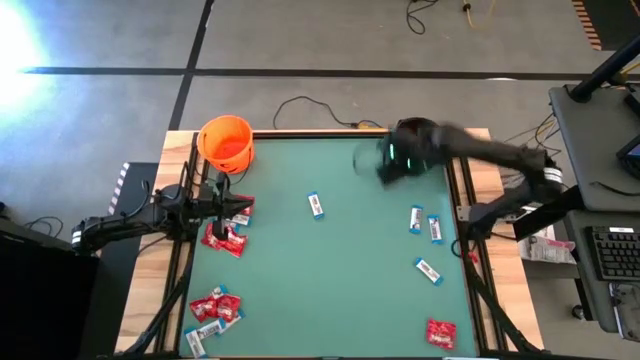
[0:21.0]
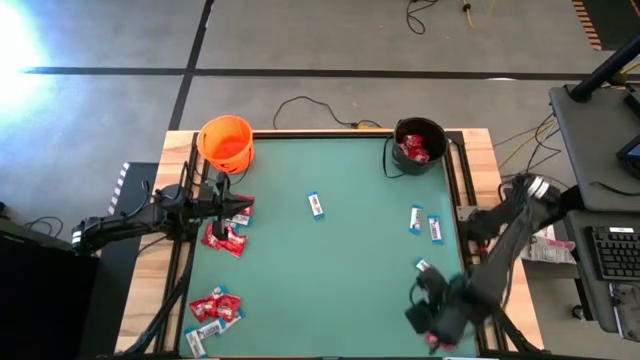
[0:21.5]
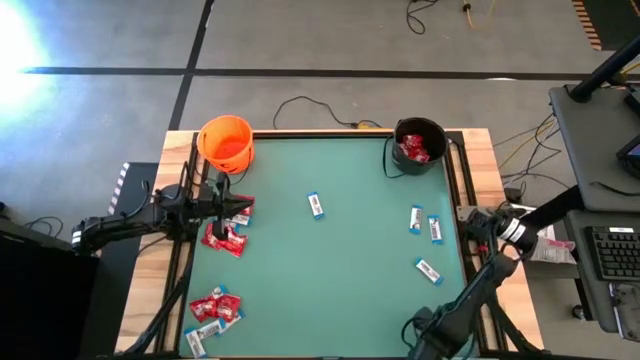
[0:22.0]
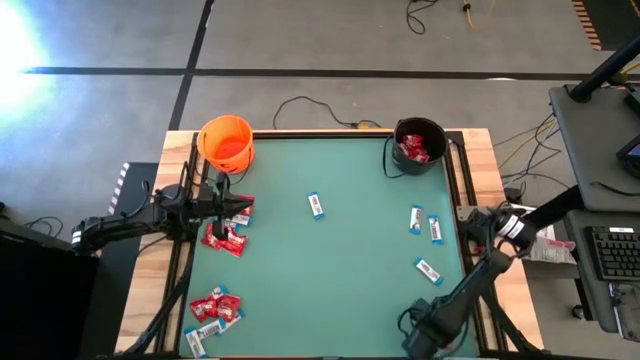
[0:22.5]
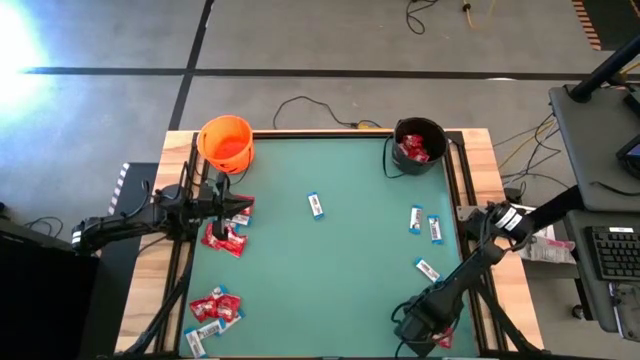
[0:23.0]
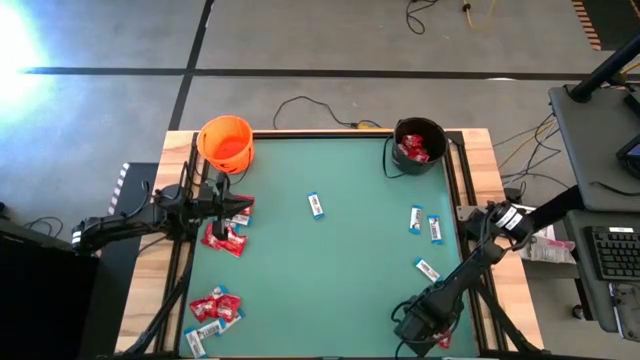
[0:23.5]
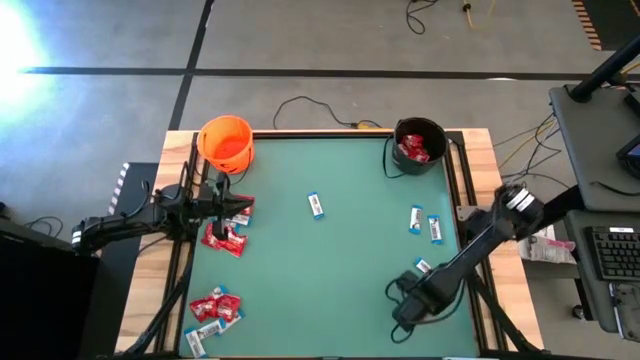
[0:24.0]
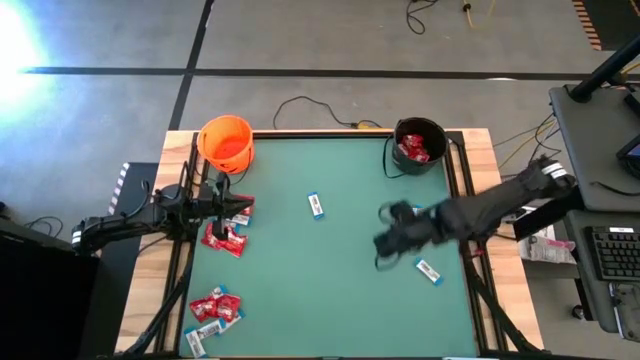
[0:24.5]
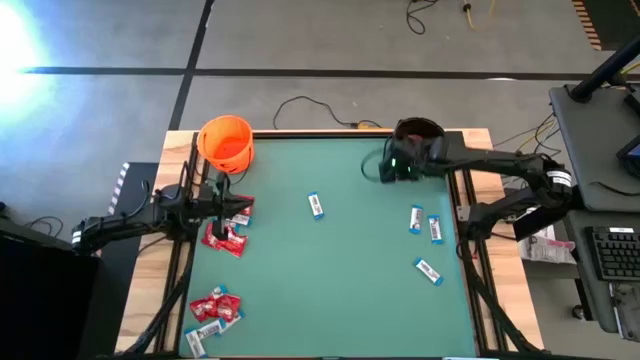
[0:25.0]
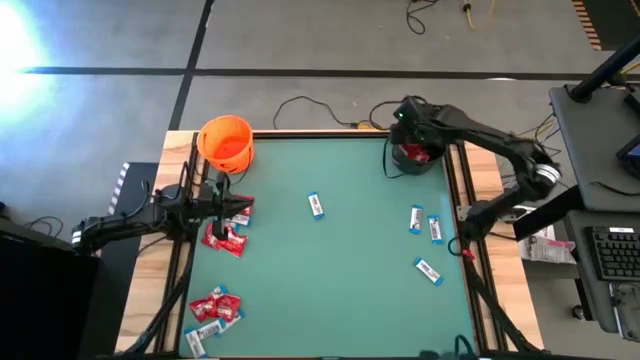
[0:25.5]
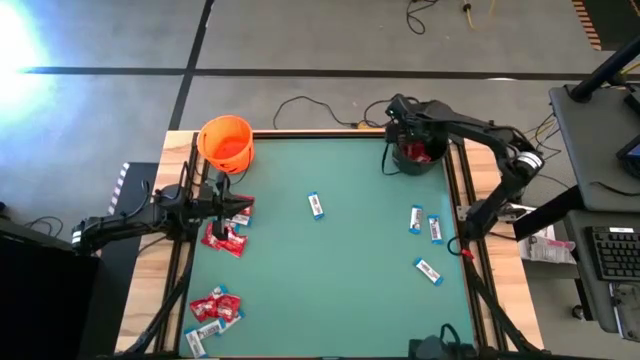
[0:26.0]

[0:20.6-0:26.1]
Task: Sort candy by brand, put in halloween buckets
Put the red candy into the black bucket

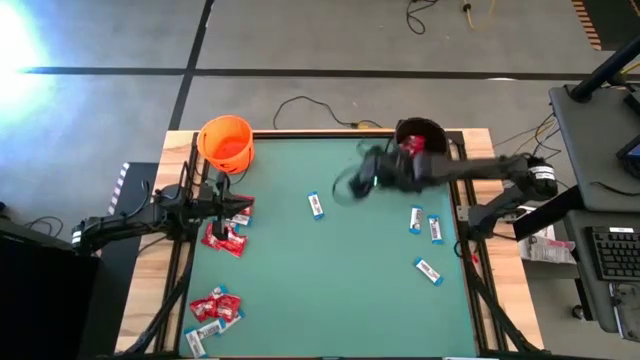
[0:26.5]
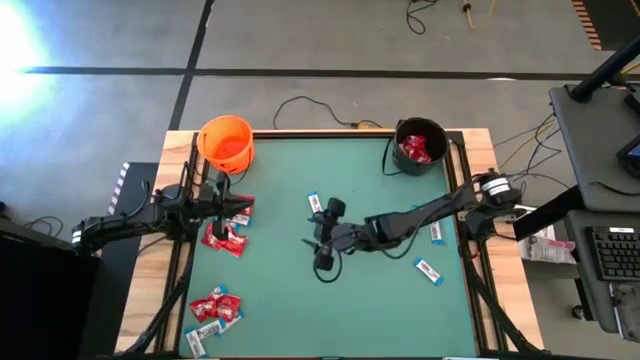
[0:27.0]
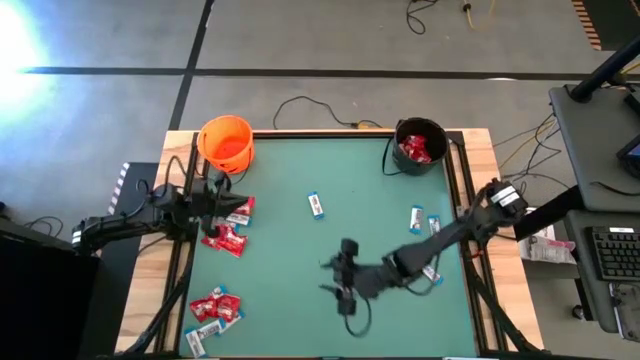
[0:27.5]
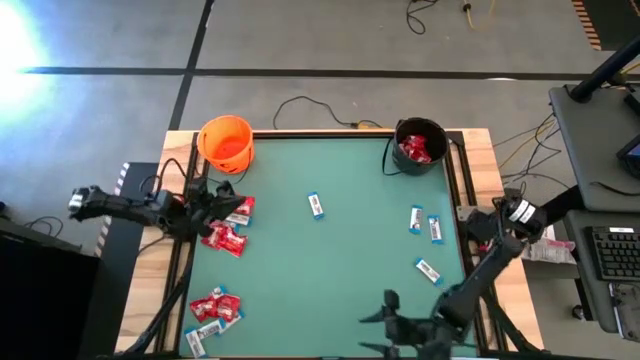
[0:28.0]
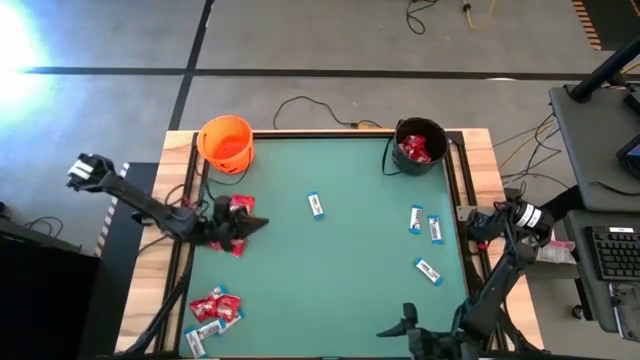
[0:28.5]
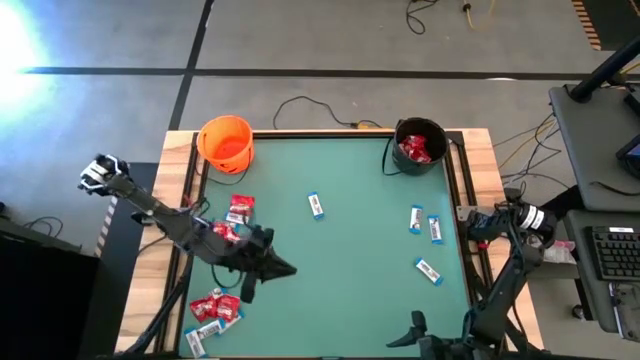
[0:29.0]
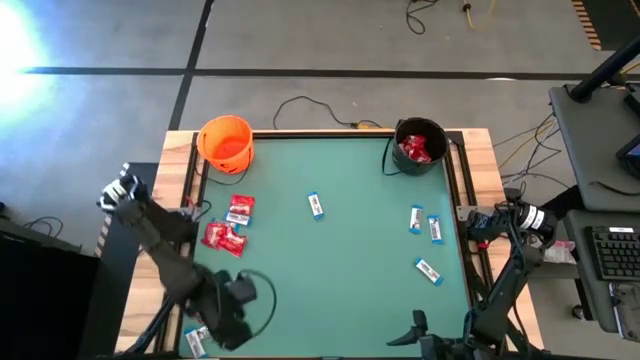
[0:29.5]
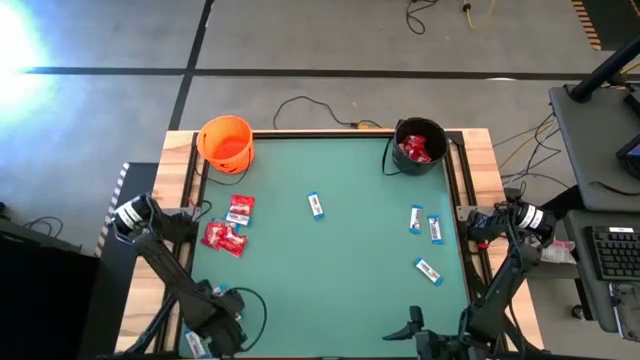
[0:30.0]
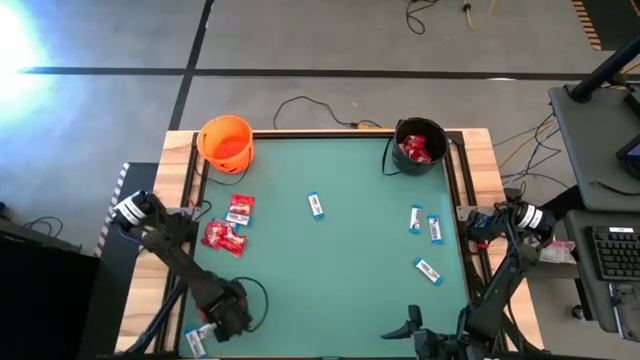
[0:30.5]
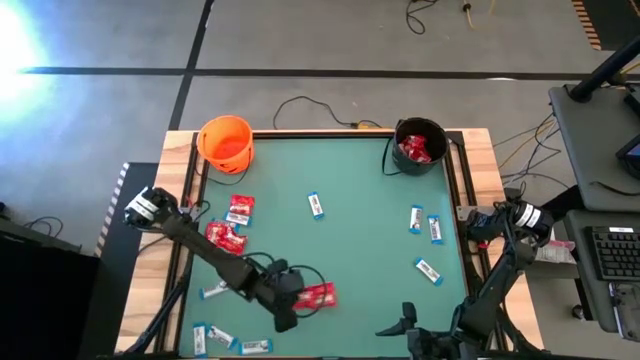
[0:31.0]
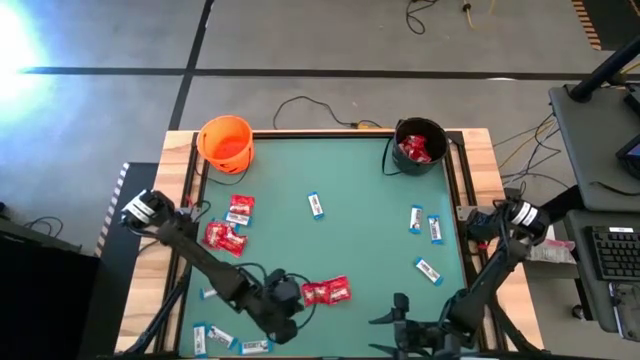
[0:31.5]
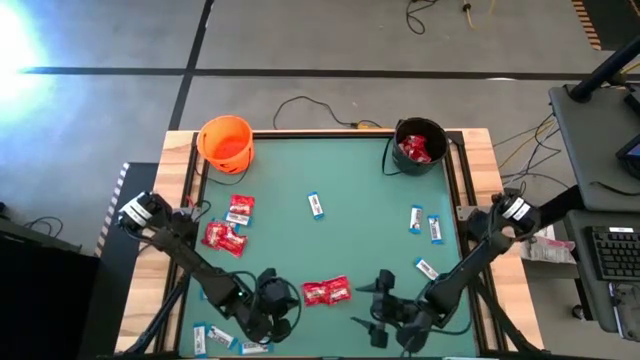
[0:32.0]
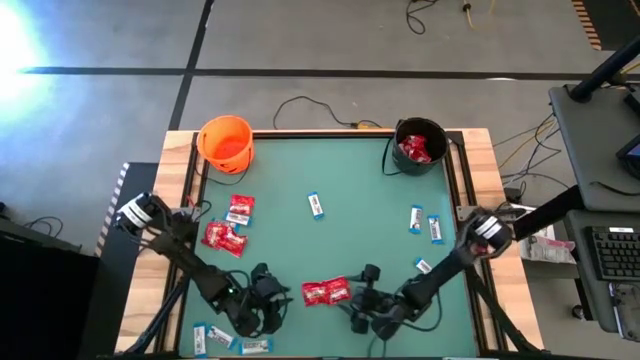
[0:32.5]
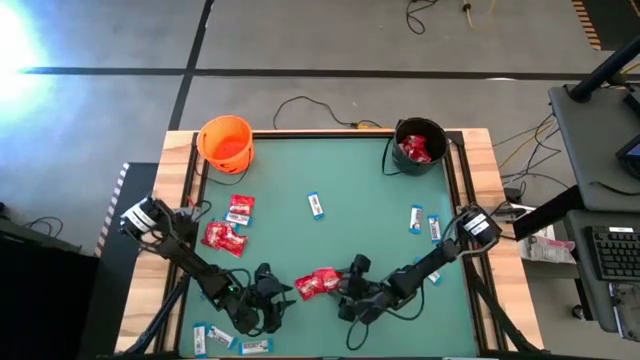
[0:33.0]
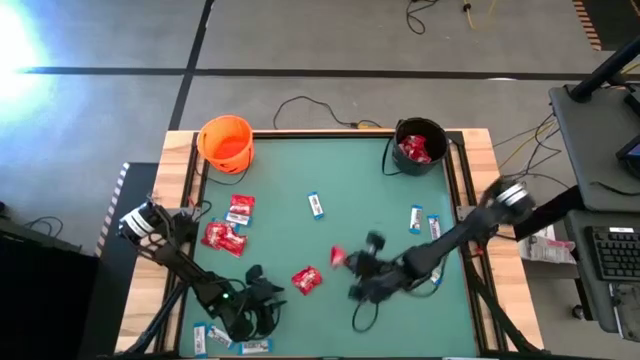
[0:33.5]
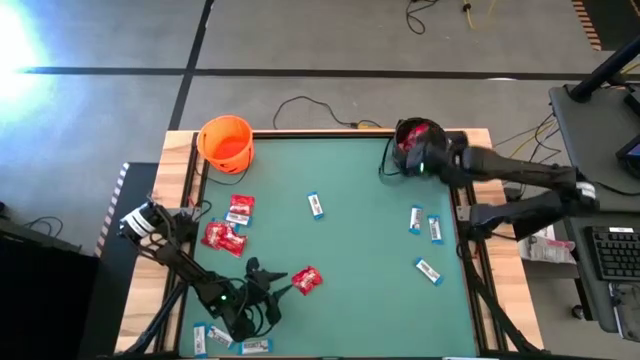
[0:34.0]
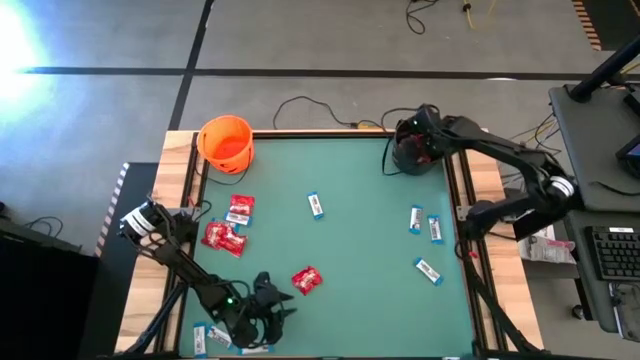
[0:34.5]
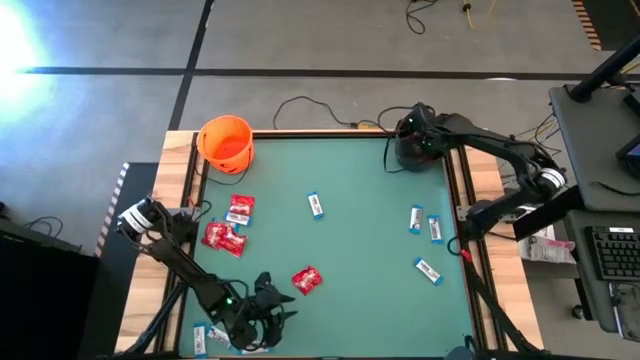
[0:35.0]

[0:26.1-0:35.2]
Put the red candy into the black bucket

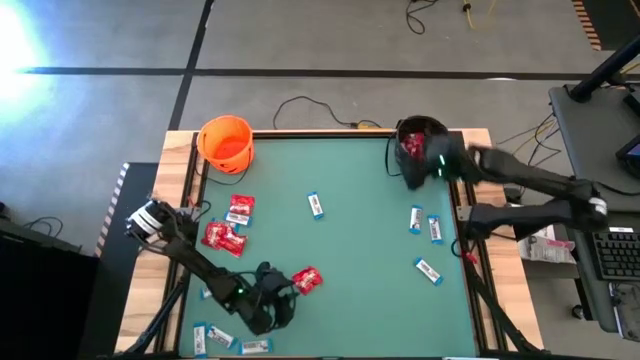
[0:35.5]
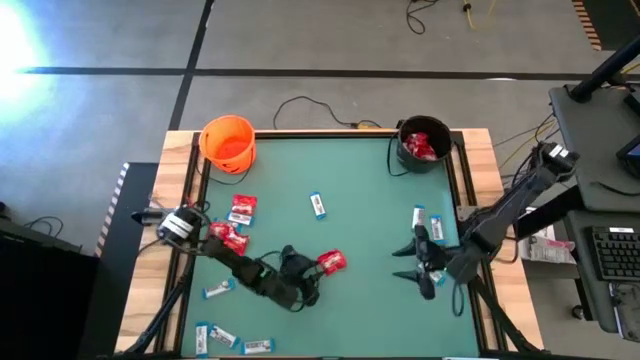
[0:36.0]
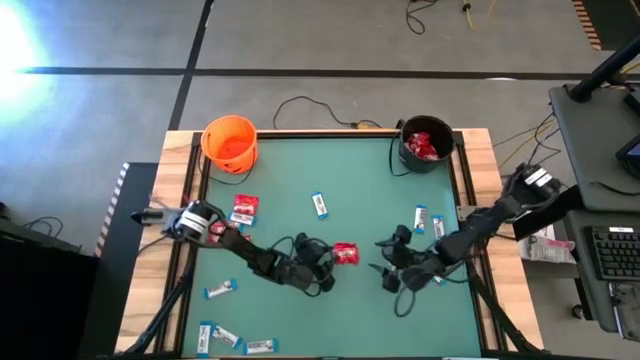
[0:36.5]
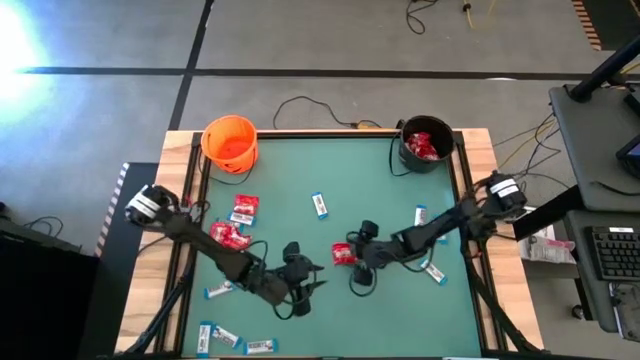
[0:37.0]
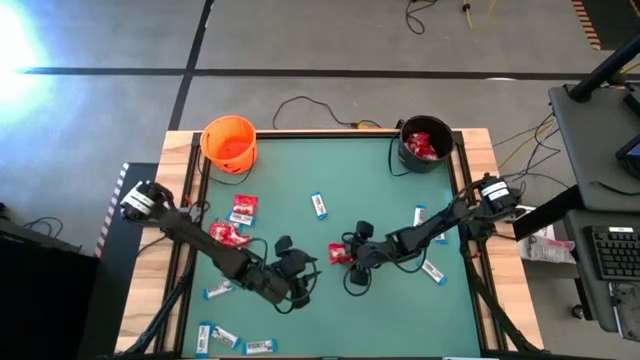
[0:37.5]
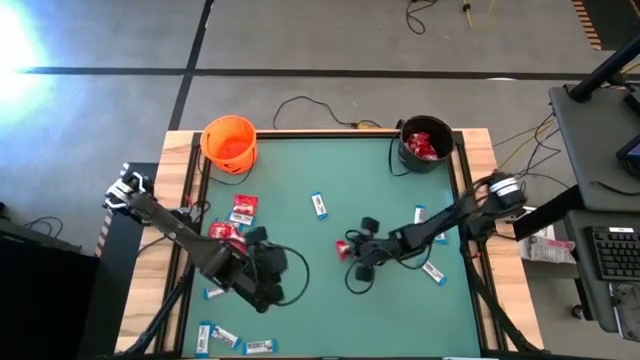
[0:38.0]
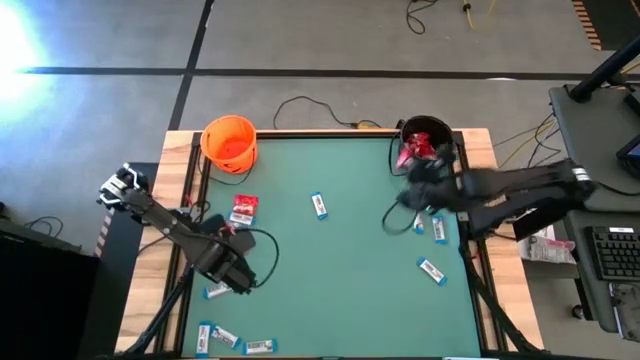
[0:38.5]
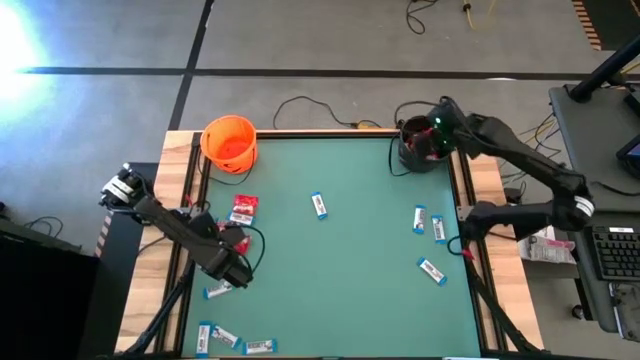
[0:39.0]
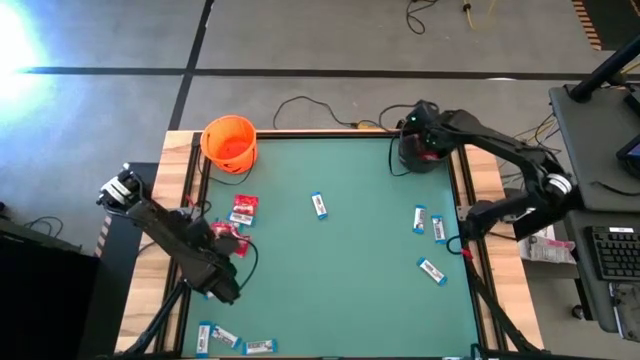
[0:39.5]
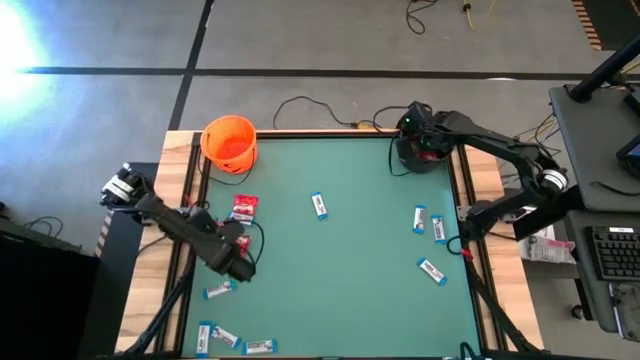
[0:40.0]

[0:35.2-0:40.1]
Put the red candy into the black bucket

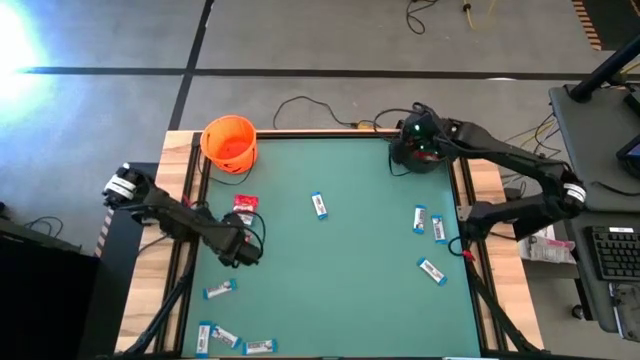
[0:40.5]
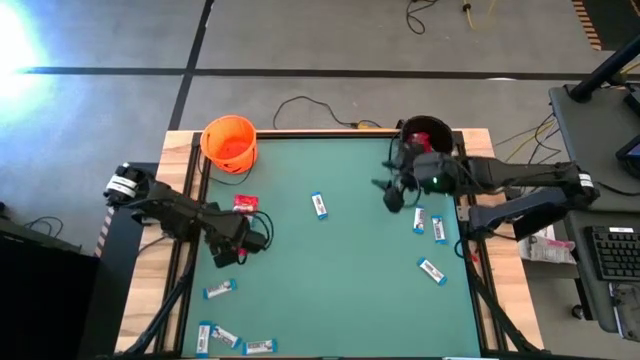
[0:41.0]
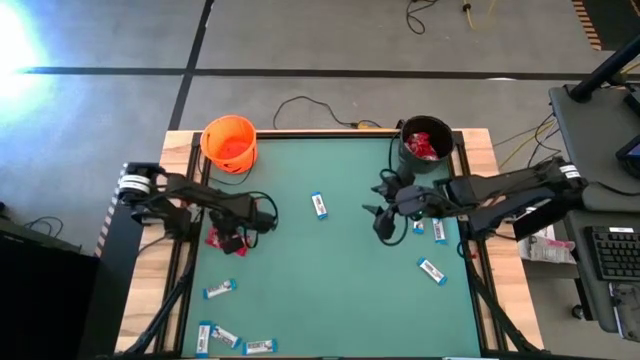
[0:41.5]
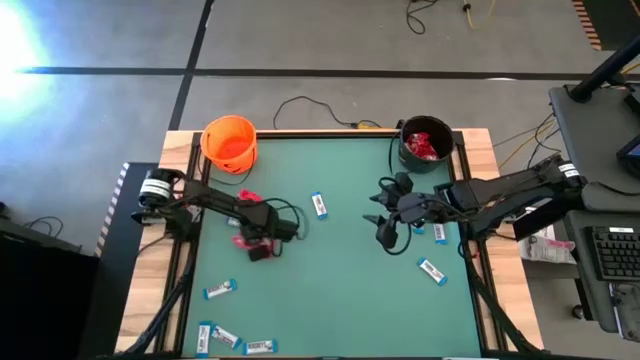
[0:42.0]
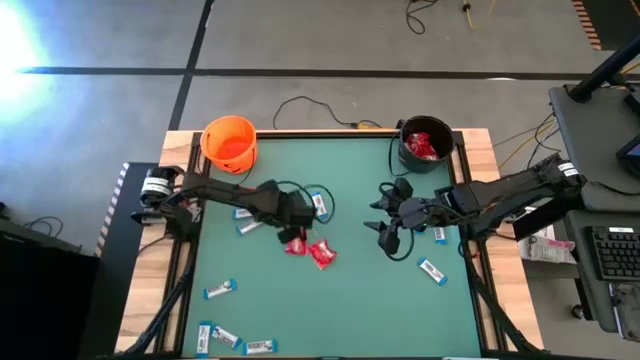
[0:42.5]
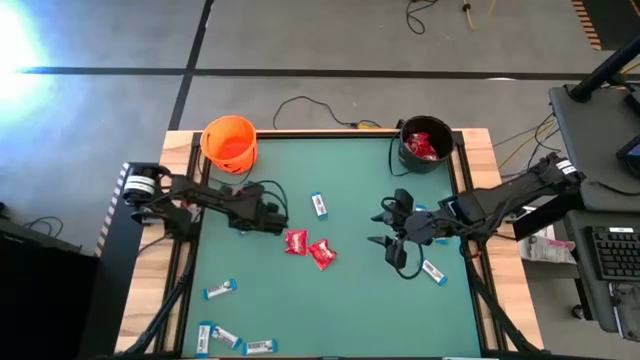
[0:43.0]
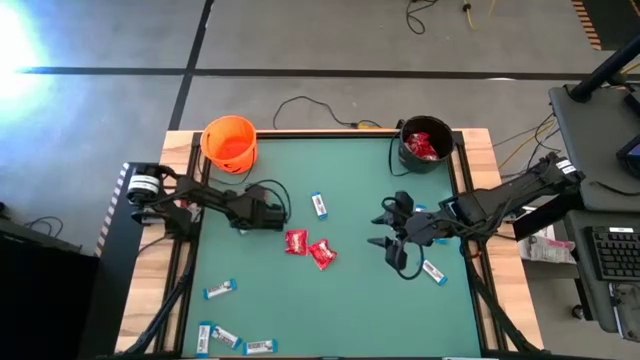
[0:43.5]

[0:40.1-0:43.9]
Move the red candies to the center of the table
